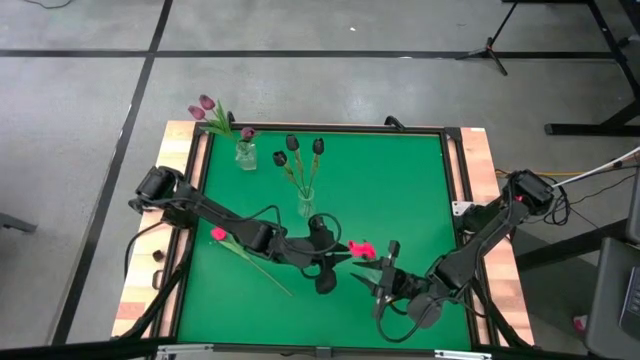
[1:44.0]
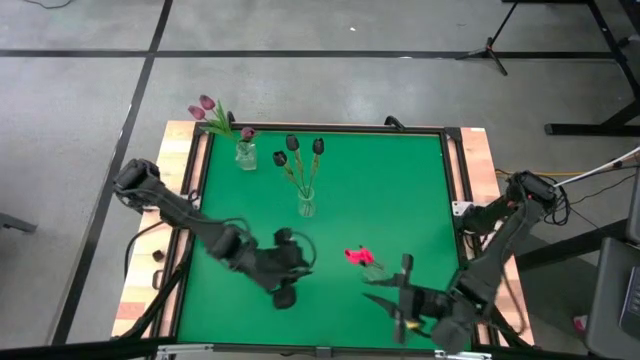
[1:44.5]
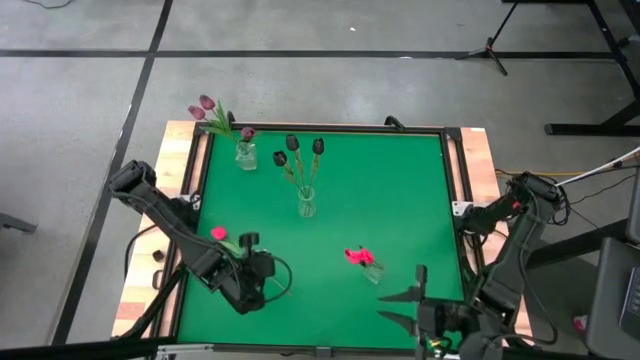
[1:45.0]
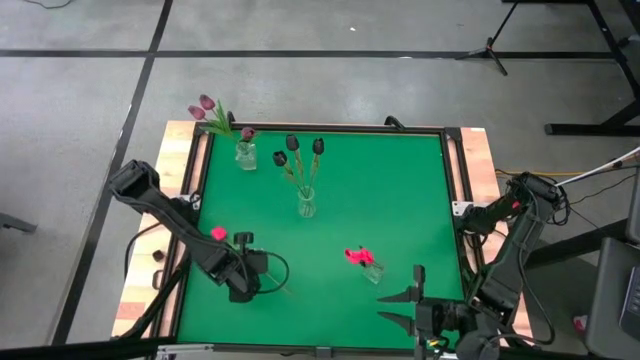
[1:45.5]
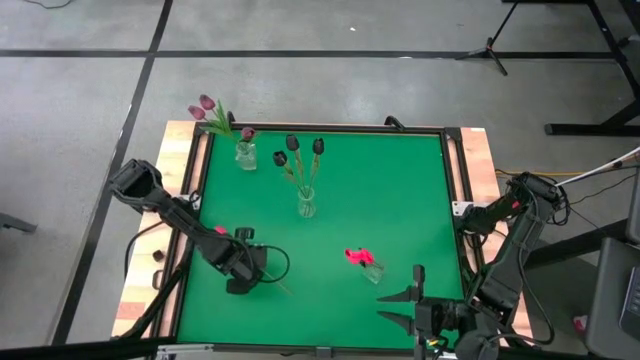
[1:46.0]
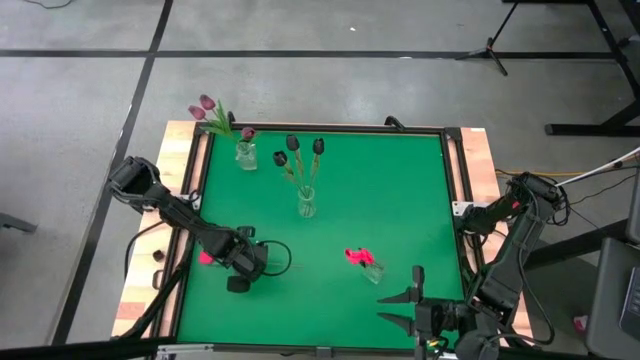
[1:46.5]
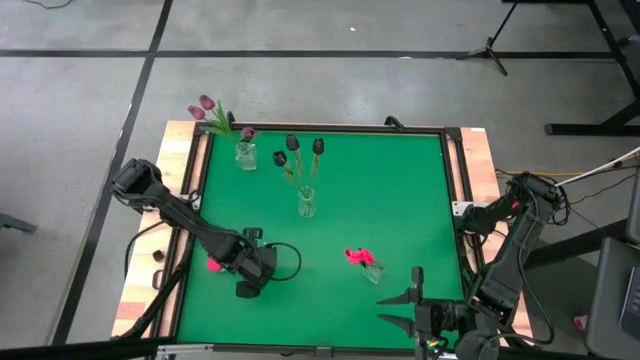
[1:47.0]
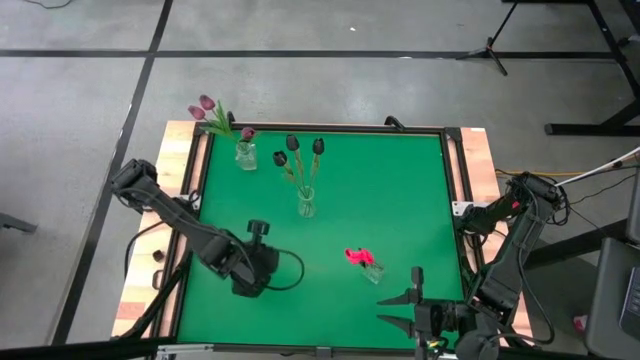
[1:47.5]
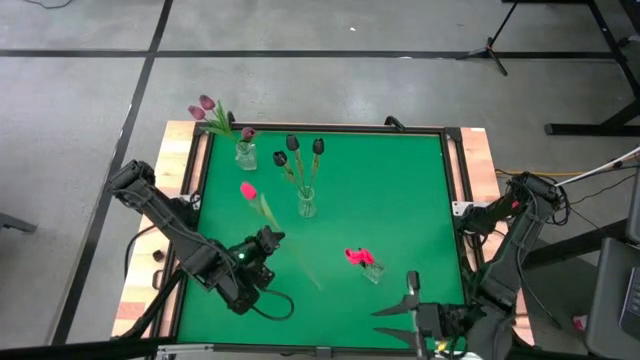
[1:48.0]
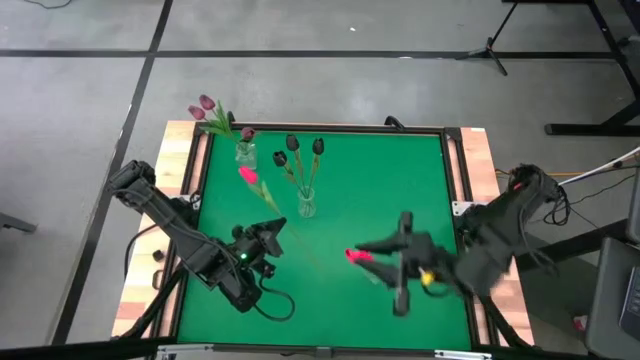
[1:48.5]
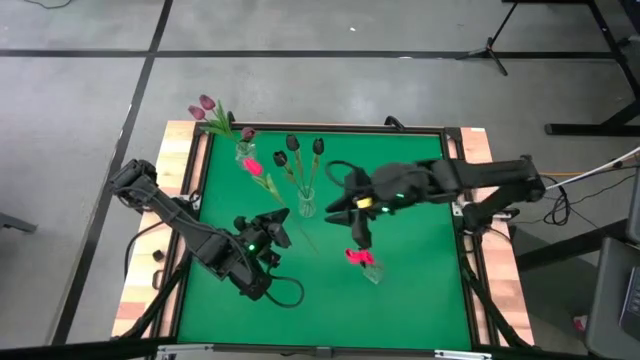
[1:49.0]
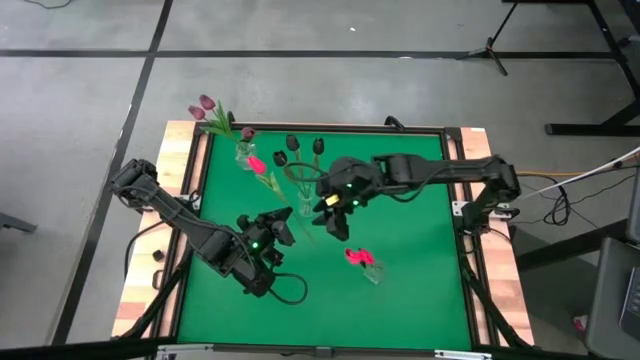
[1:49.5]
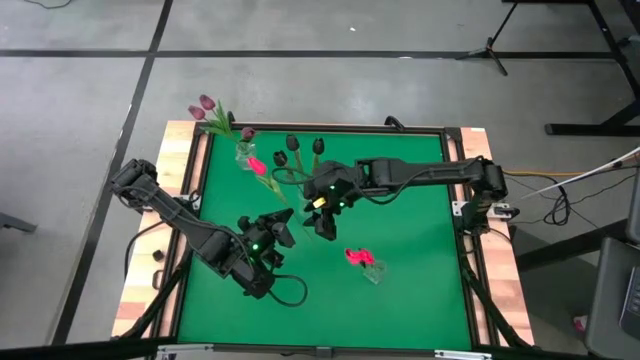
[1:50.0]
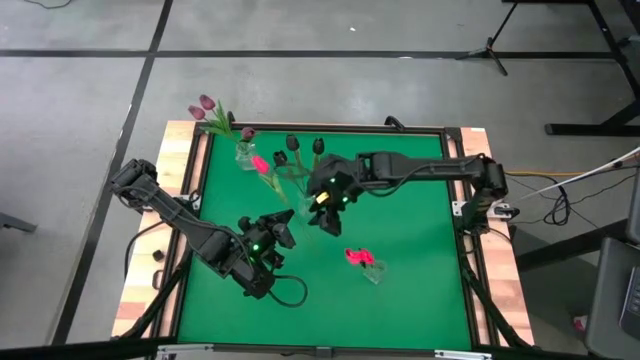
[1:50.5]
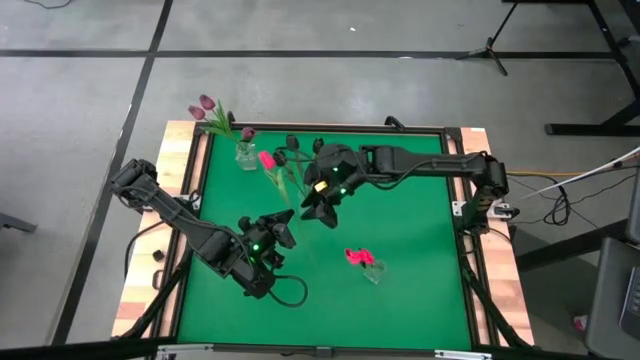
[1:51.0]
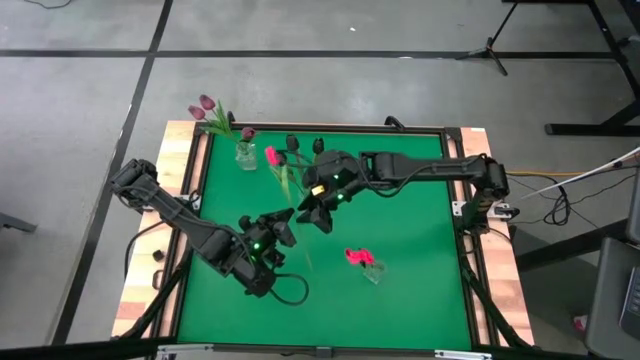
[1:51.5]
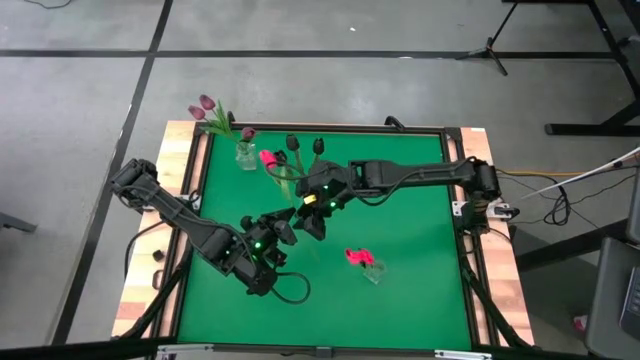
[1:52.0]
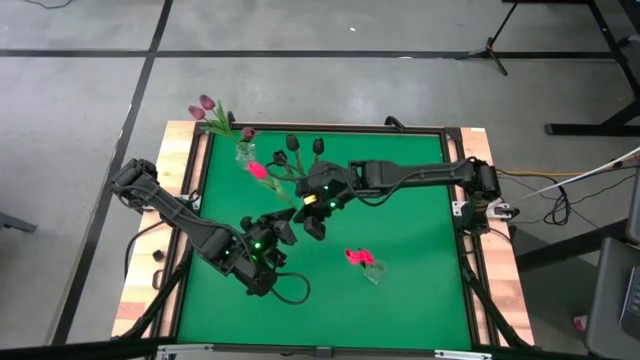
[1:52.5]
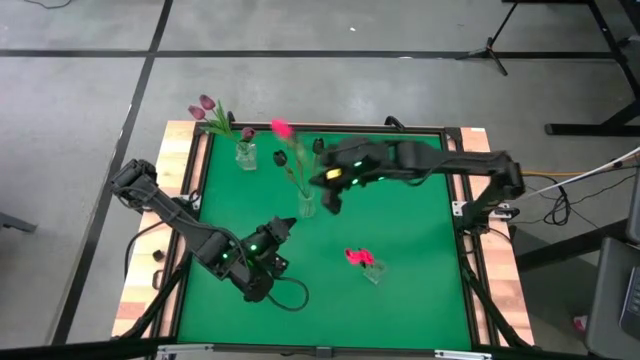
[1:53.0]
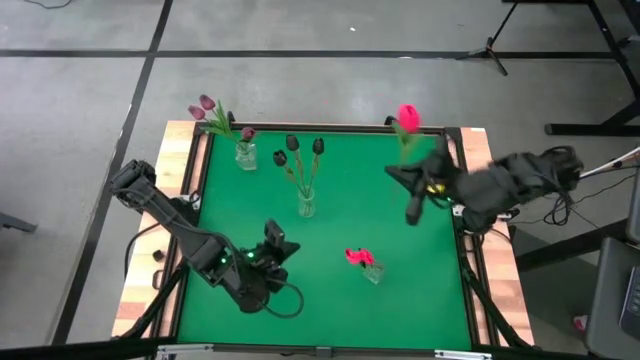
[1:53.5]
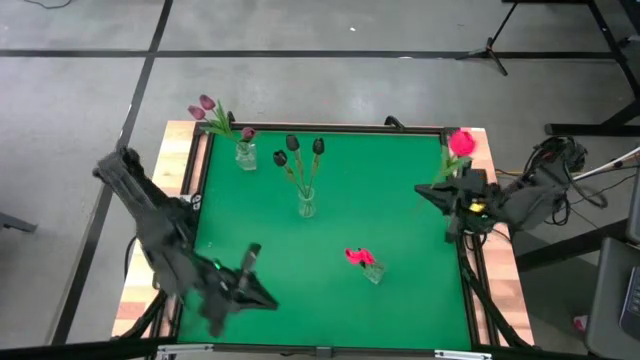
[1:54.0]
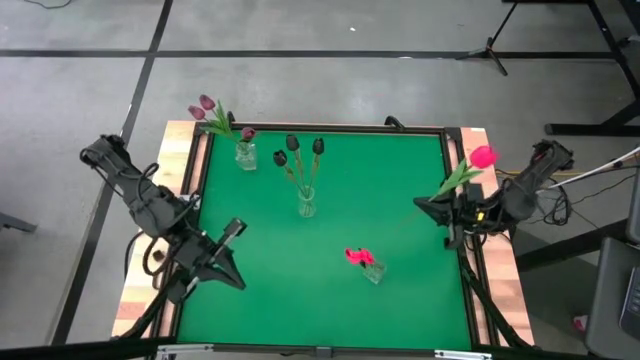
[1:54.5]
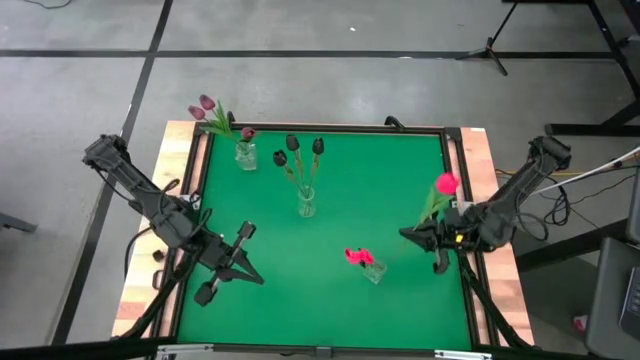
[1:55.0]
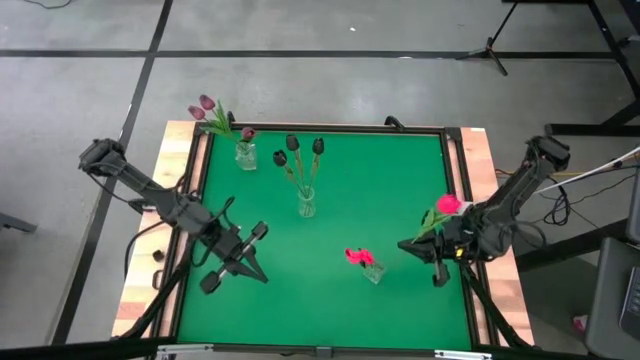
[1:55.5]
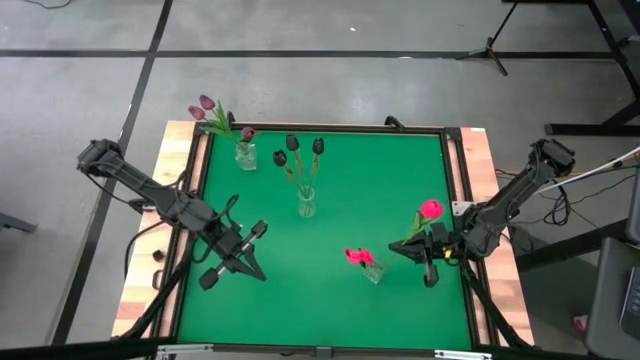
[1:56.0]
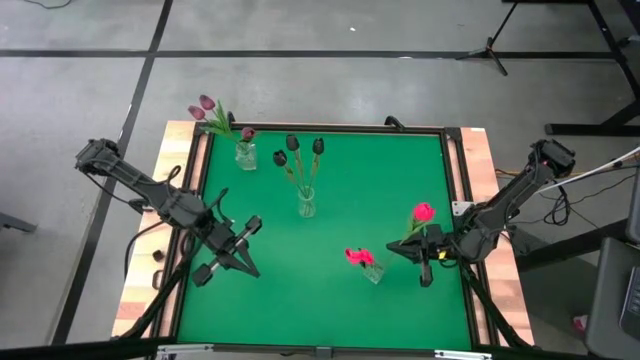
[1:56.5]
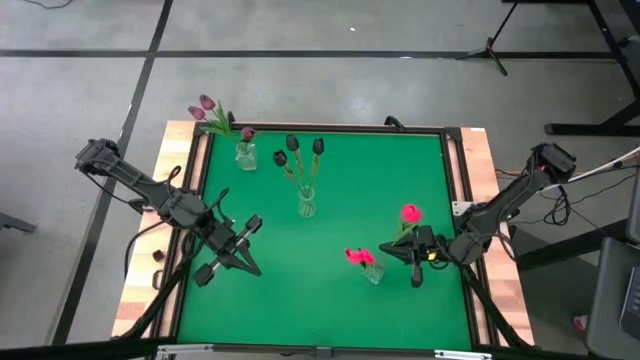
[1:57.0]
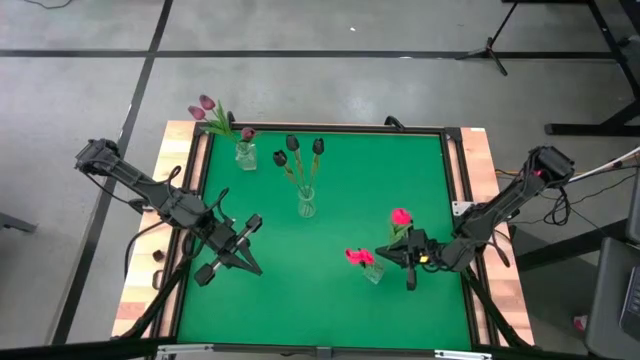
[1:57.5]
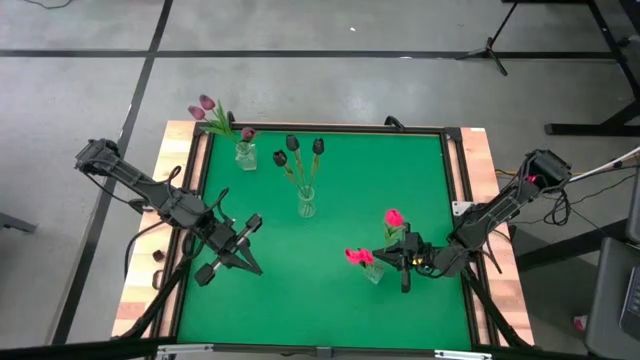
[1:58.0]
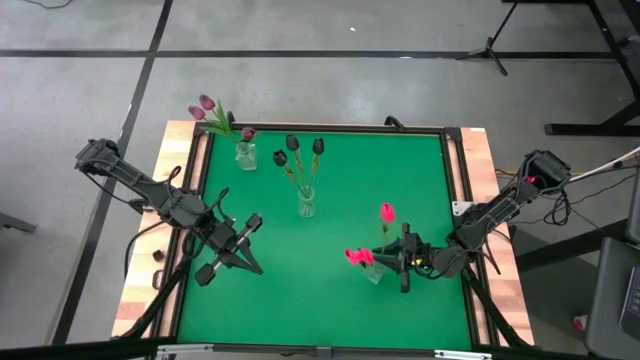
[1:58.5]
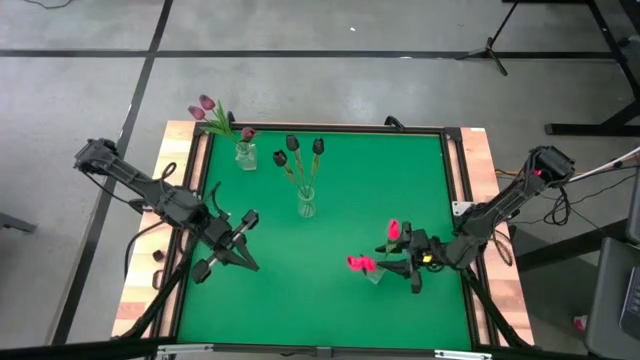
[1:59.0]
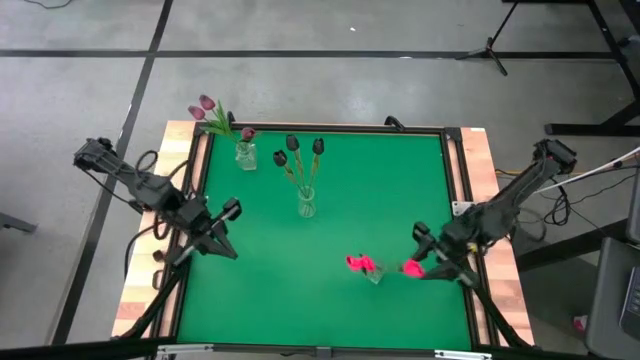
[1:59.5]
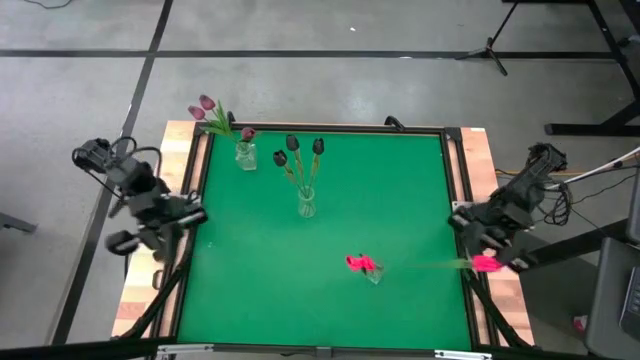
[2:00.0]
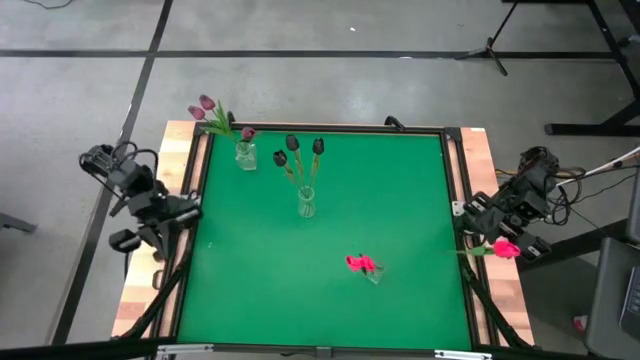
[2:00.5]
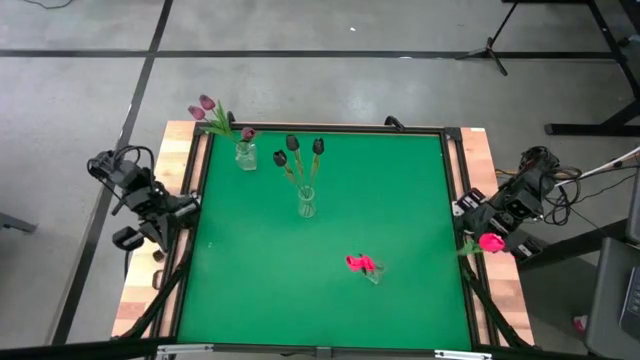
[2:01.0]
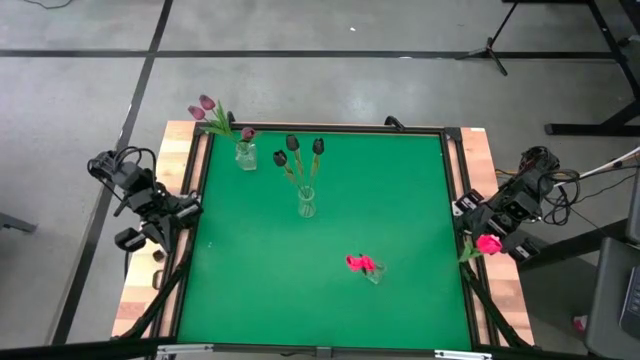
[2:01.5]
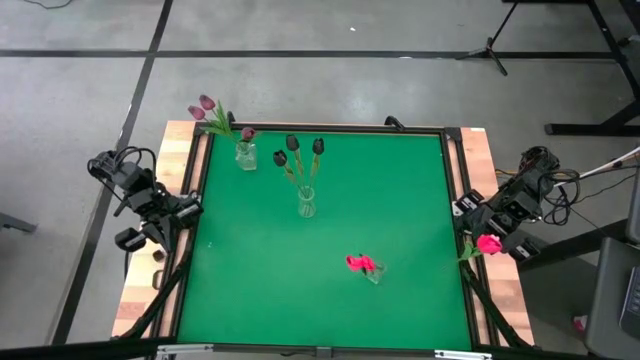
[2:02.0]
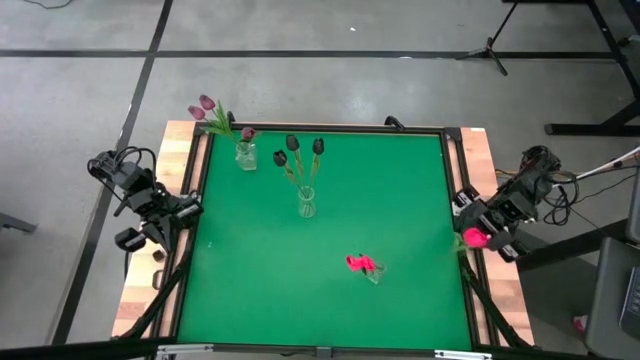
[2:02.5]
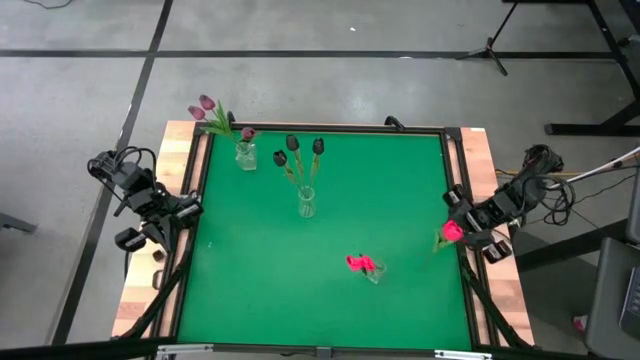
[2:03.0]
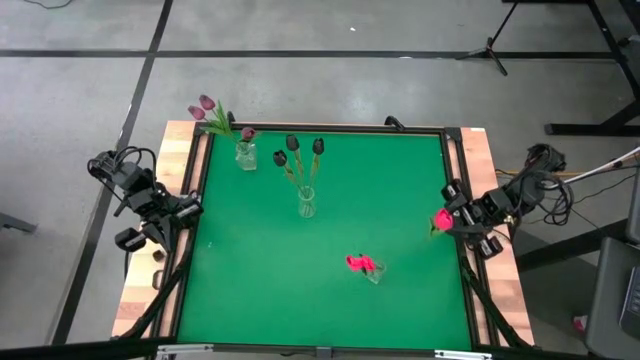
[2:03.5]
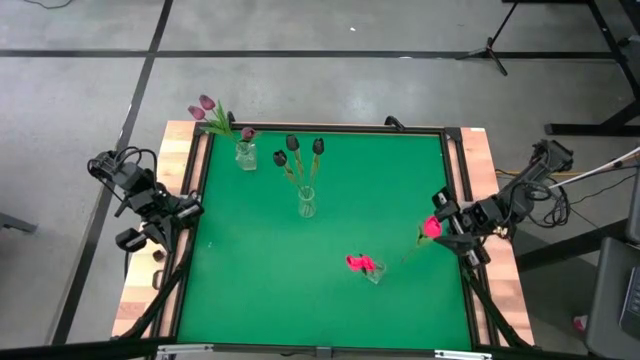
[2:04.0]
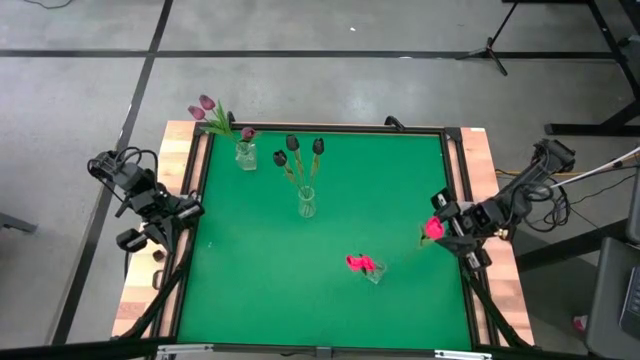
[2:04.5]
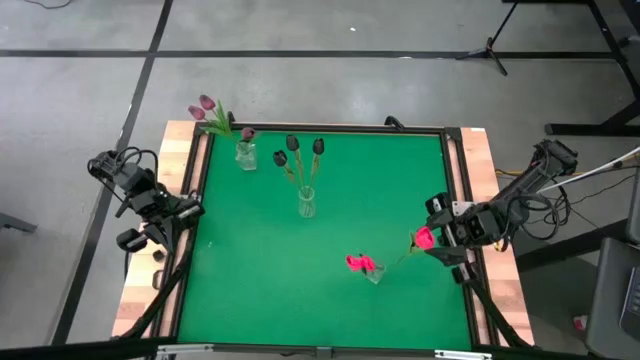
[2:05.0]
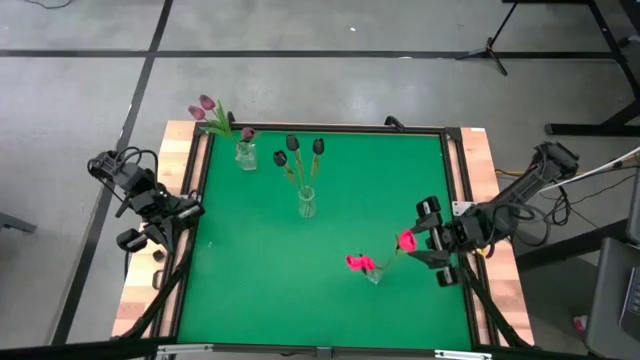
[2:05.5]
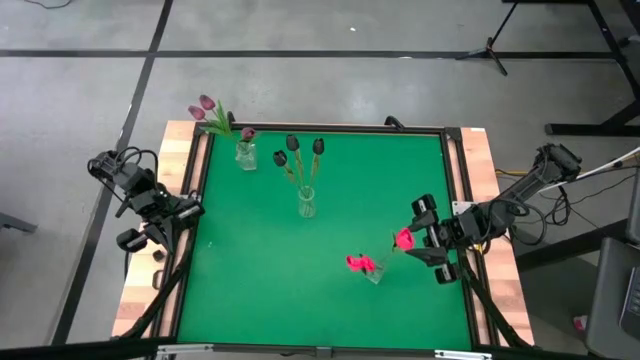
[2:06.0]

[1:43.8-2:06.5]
Task: Sort flowers into vase by color
Put the pink tulip into the bottom transparent vase
